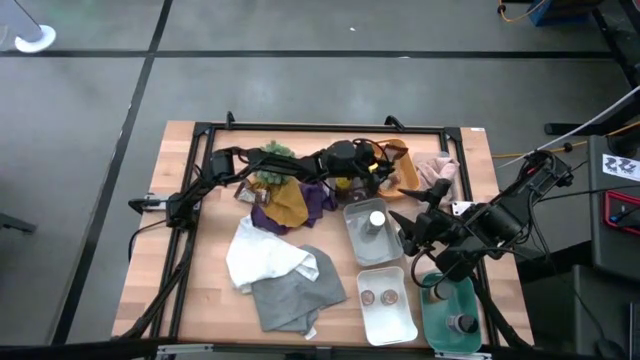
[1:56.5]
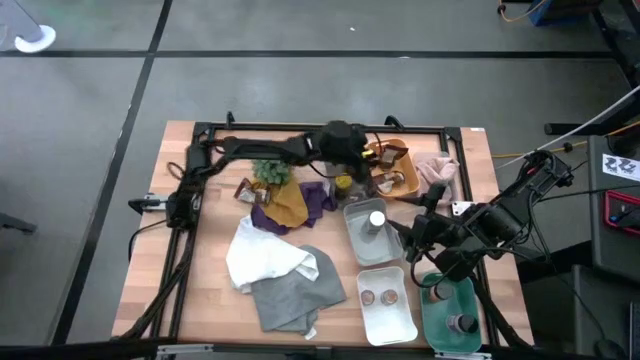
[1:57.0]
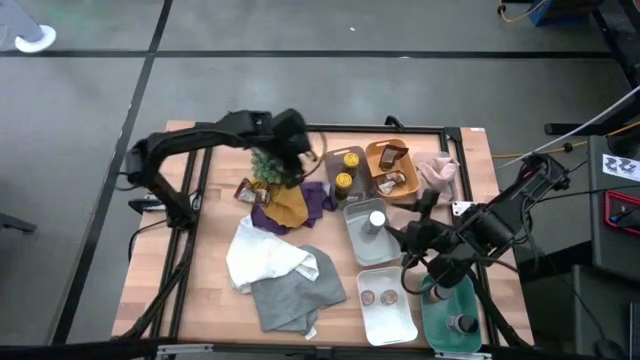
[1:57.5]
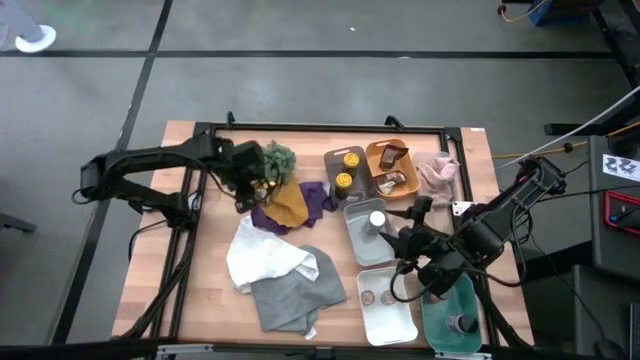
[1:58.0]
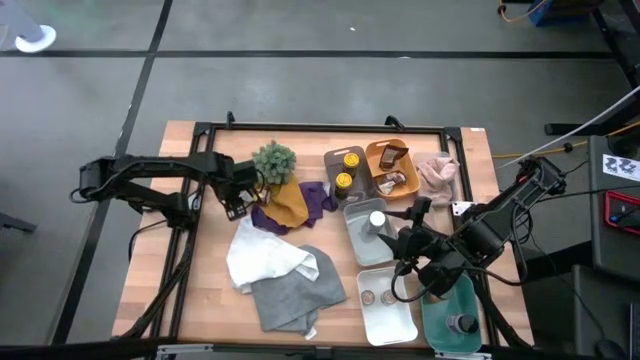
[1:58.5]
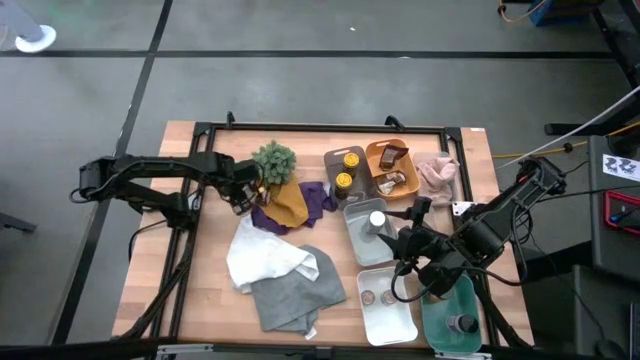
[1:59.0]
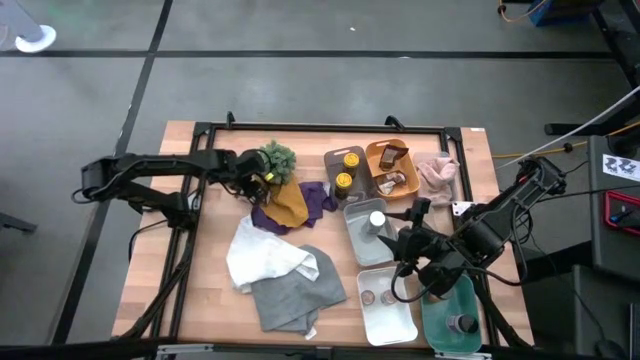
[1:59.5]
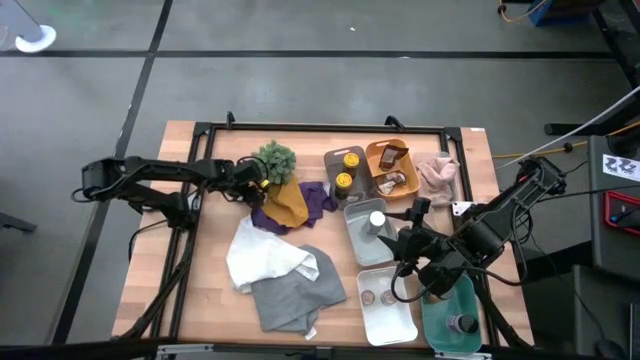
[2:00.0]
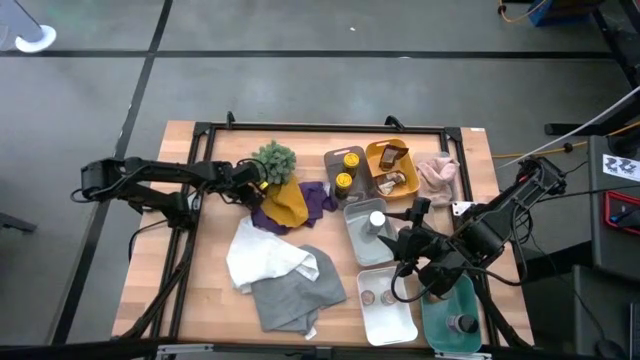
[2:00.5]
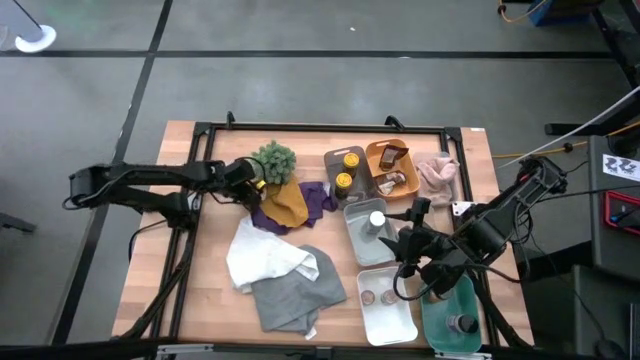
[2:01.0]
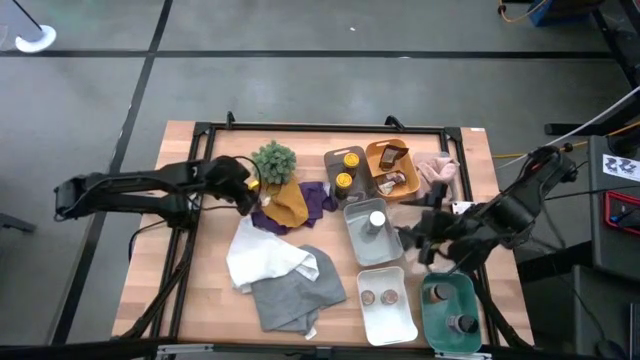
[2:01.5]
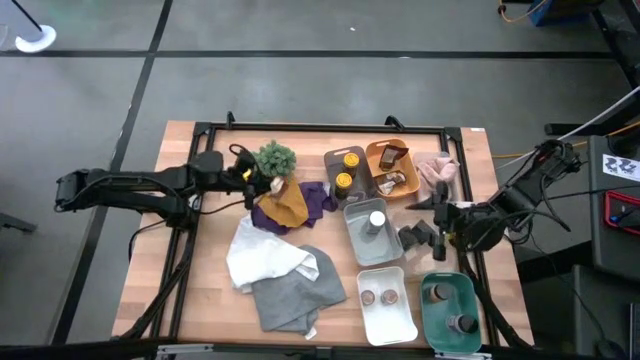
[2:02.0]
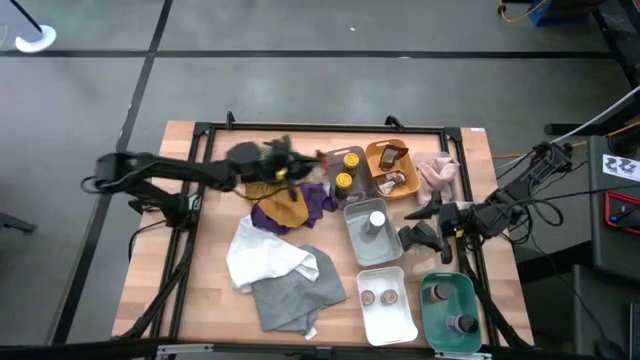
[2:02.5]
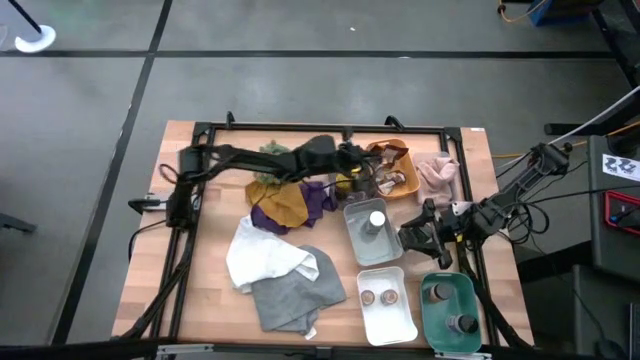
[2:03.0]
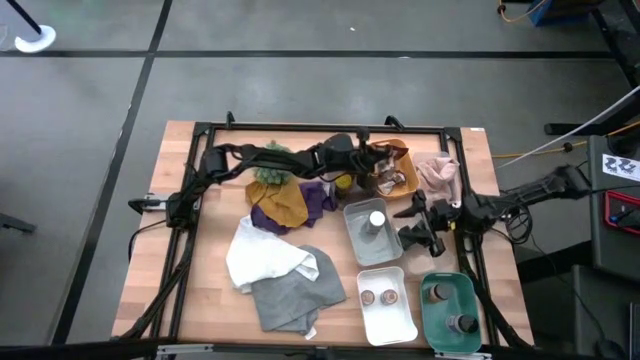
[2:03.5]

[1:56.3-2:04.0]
Task: Sort spices by type
Put the orange seasoning pack into the yellow bin

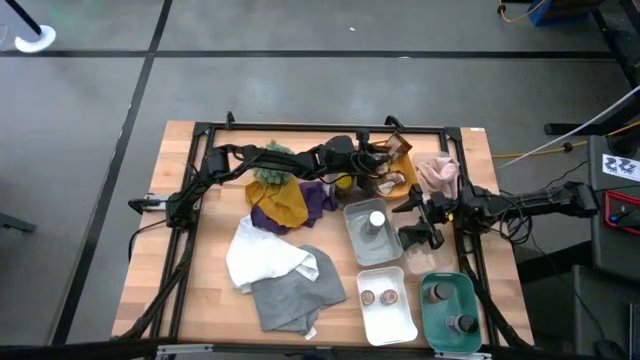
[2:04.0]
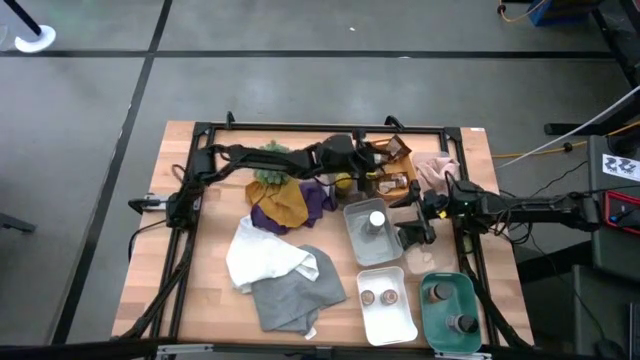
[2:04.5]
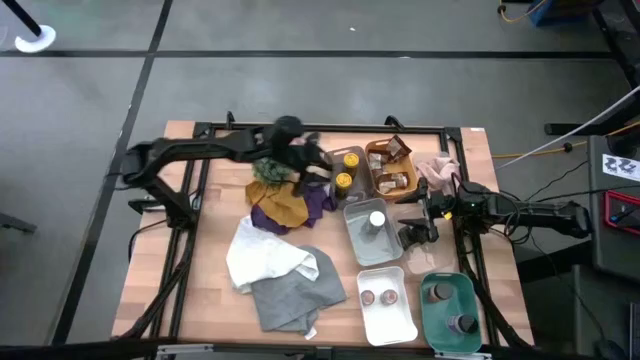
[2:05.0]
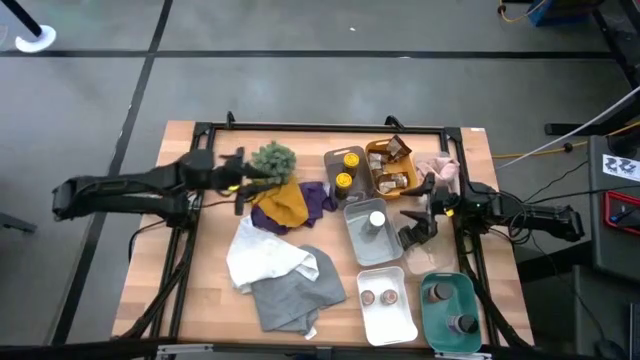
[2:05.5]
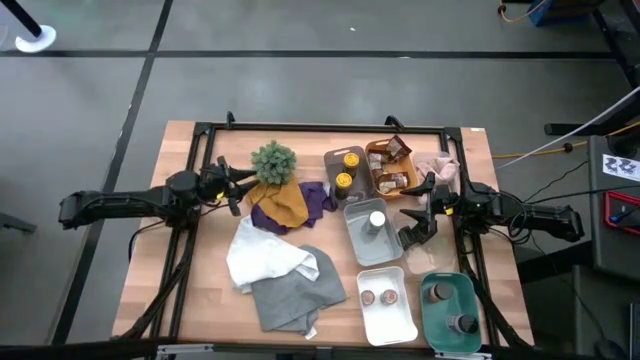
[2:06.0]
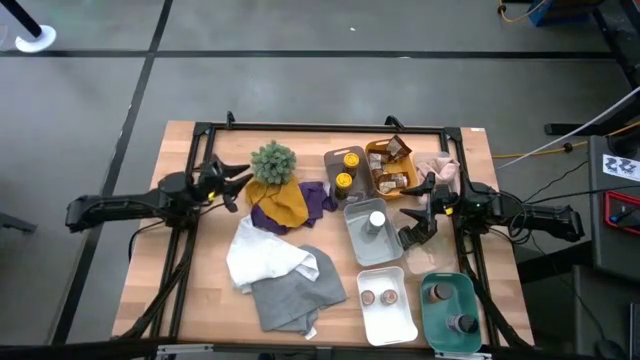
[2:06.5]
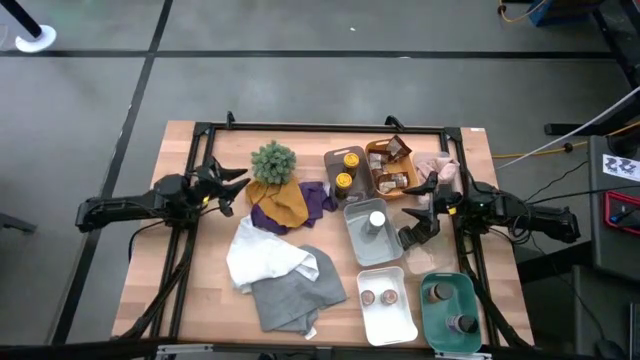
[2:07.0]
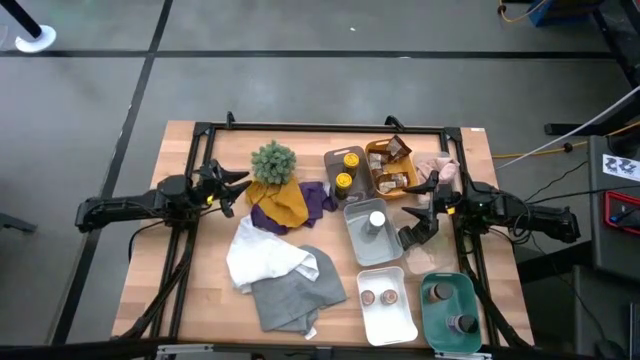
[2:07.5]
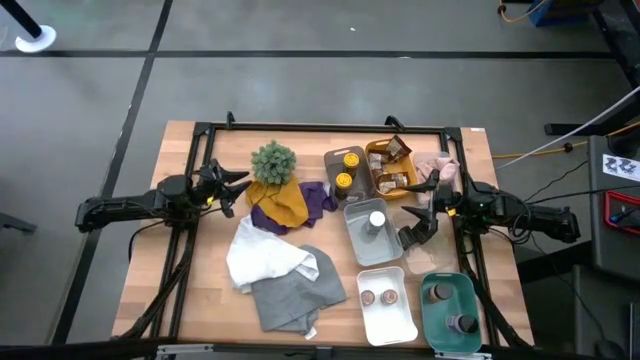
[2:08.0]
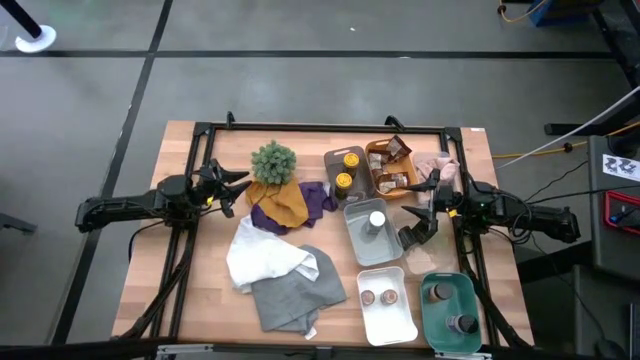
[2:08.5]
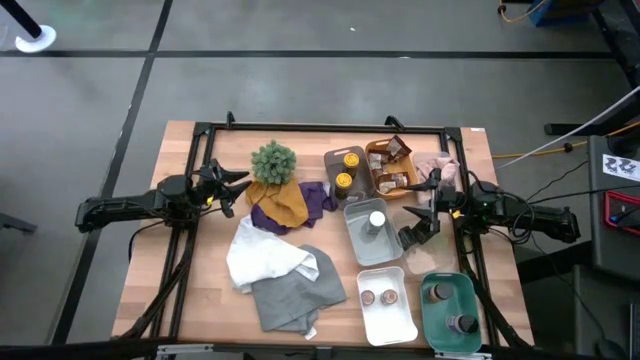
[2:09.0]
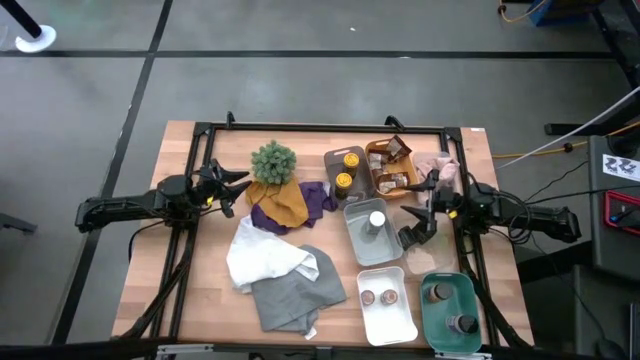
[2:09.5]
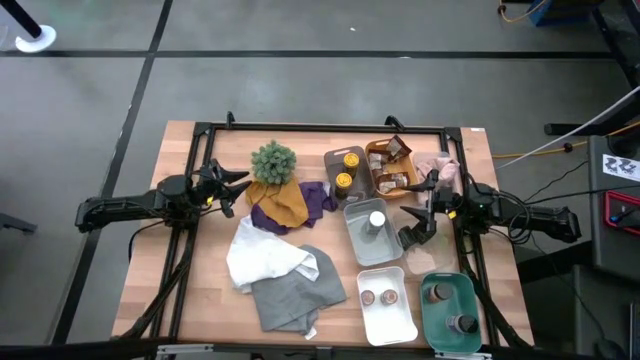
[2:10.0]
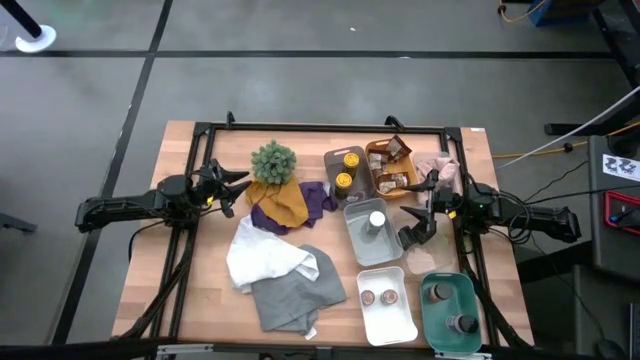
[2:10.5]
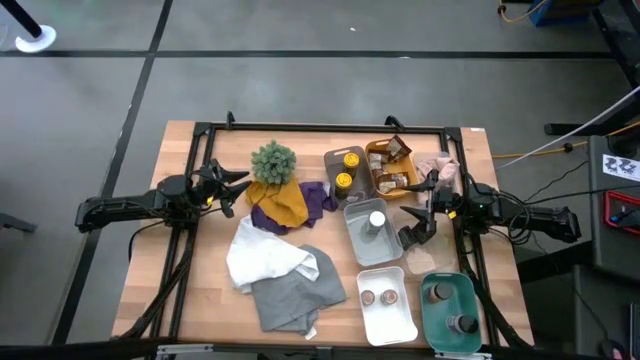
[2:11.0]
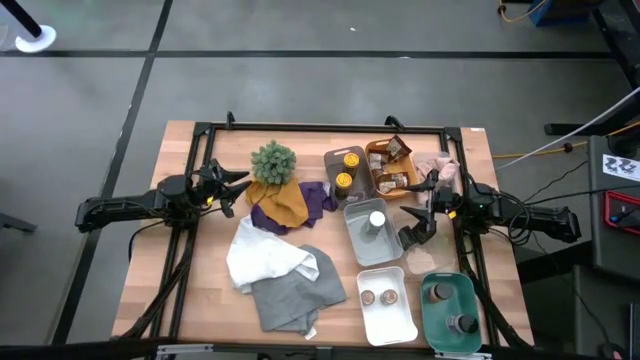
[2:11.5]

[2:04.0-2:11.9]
Return to Home position

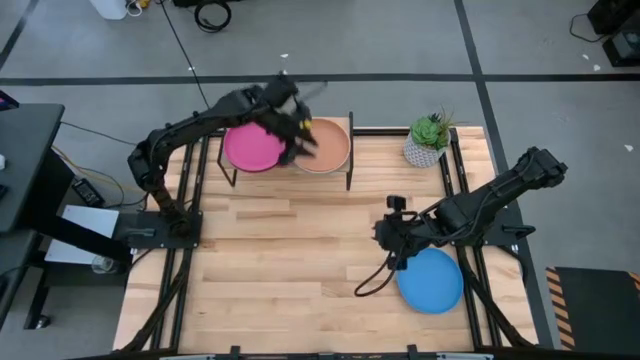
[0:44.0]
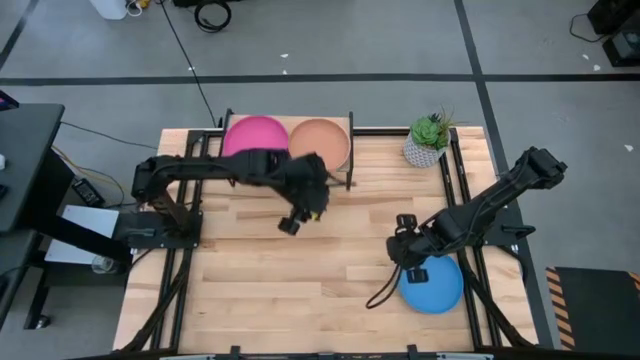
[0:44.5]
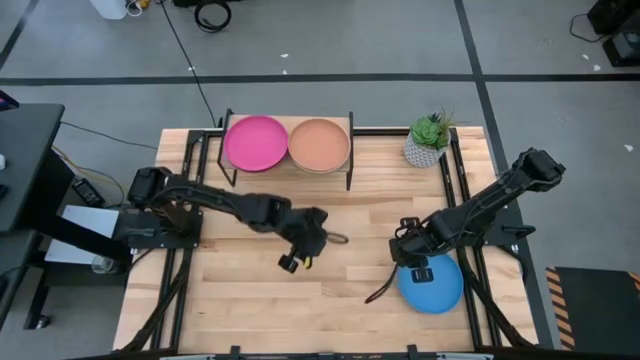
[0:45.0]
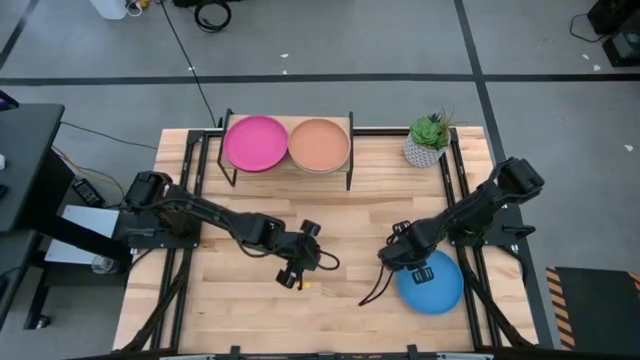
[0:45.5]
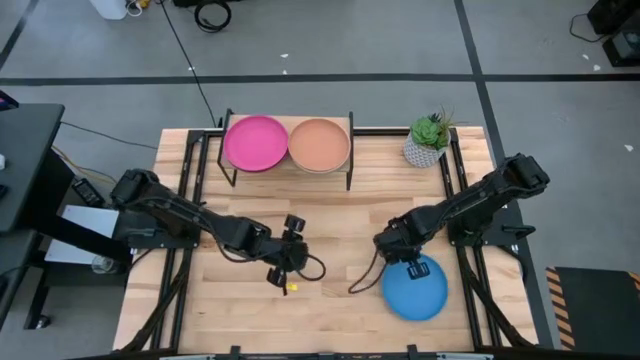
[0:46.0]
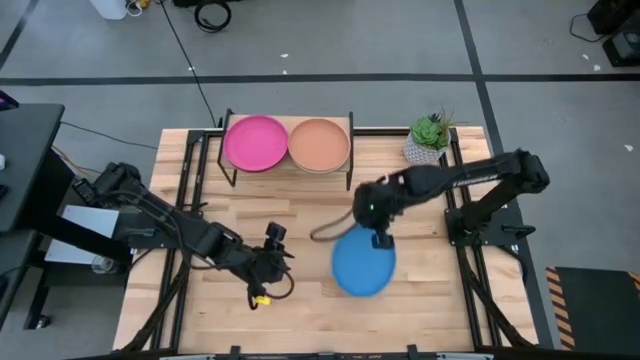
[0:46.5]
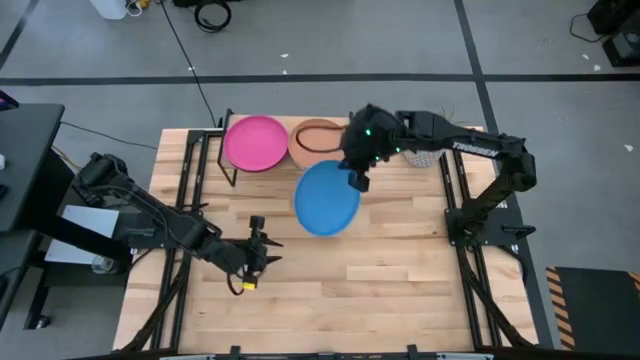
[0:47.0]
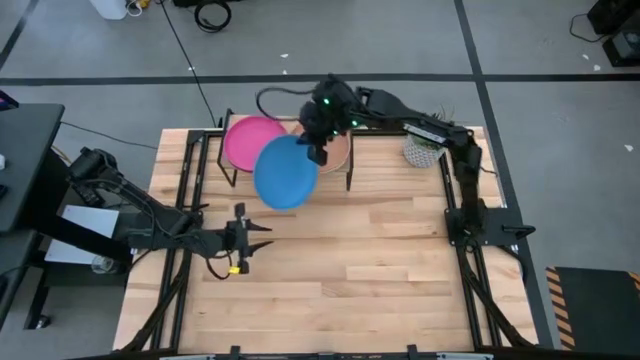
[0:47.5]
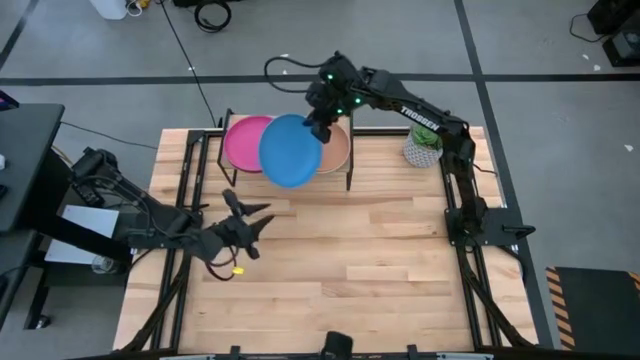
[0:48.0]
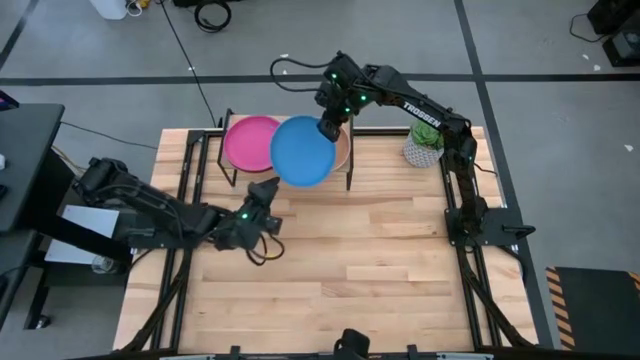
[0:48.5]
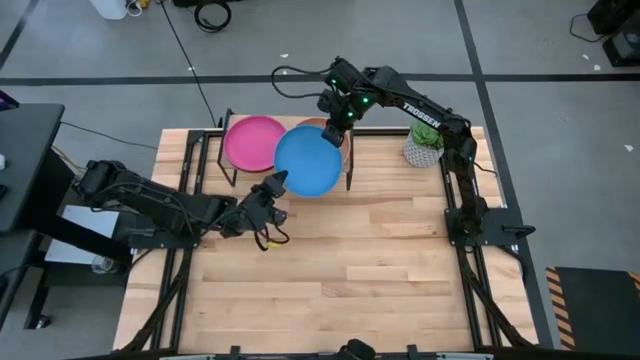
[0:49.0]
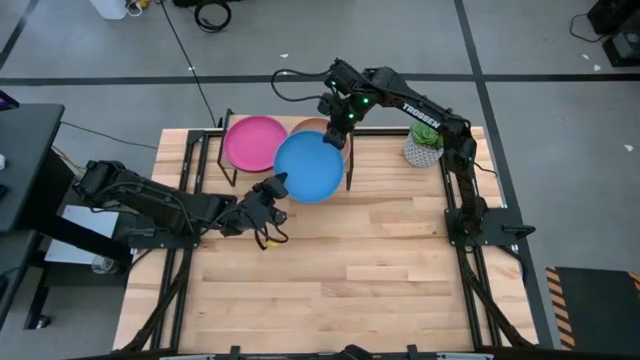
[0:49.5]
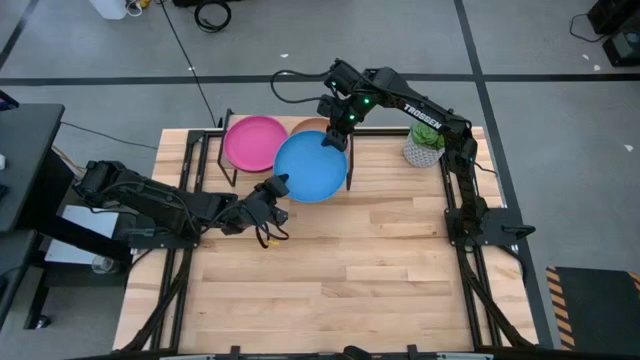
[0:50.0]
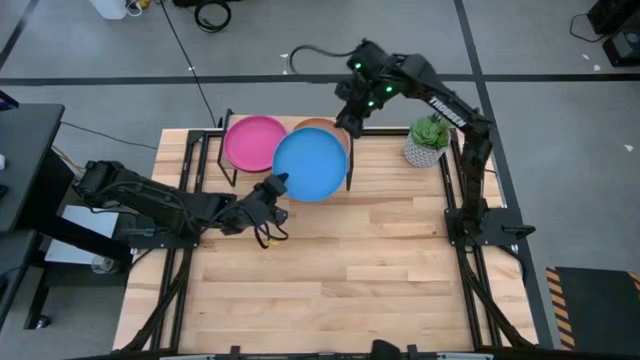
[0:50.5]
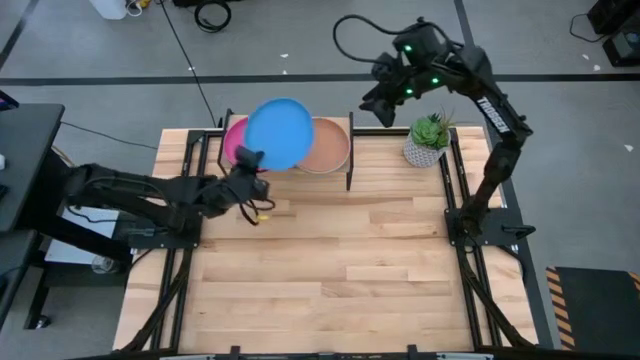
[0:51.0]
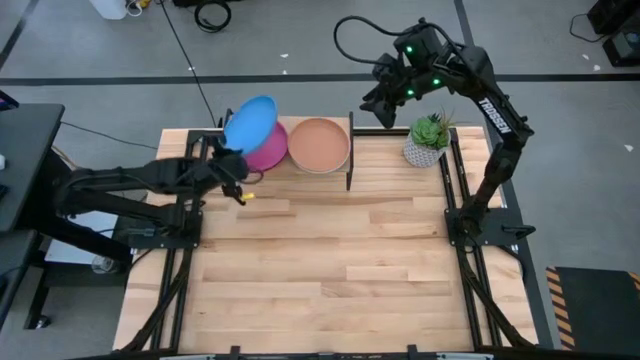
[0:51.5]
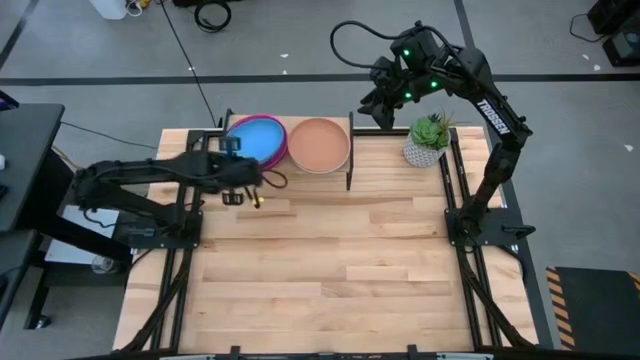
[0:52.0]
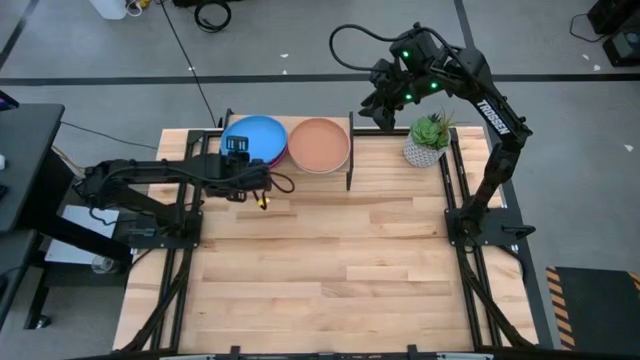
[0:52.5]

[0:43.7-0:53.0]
Task: Place and stack plates onto a shelf
Stack the blue plate on the top of the pink plate
